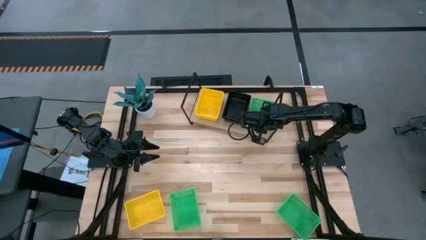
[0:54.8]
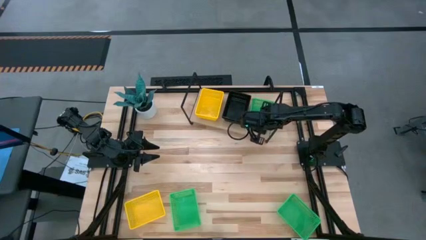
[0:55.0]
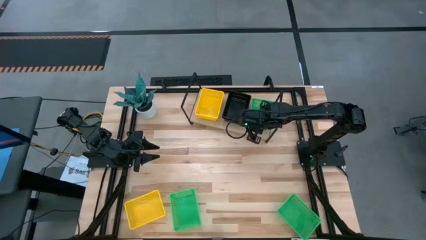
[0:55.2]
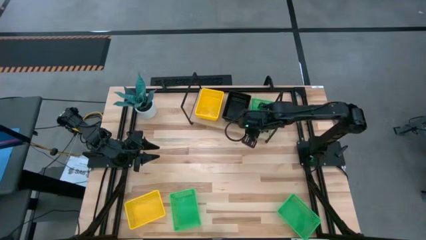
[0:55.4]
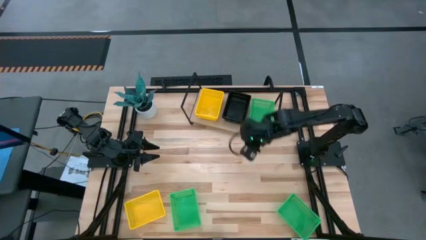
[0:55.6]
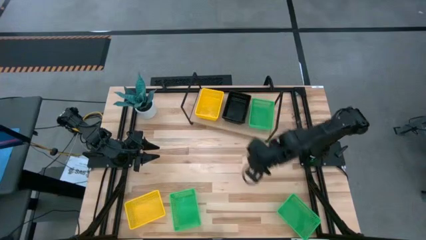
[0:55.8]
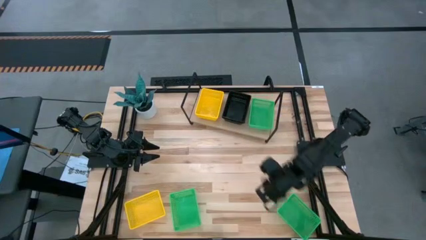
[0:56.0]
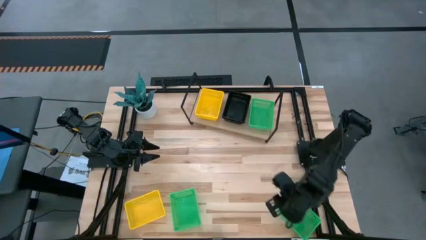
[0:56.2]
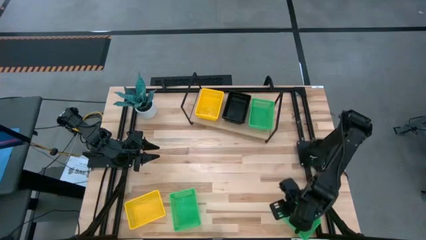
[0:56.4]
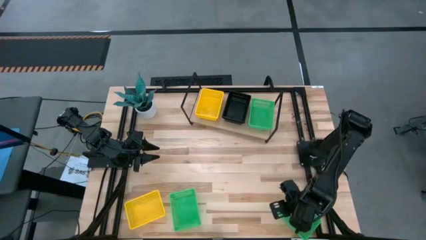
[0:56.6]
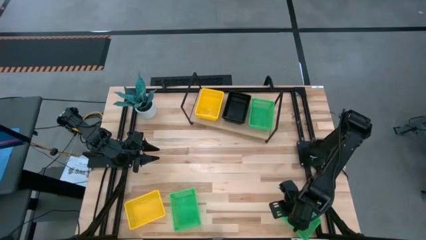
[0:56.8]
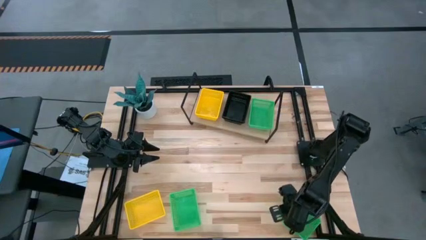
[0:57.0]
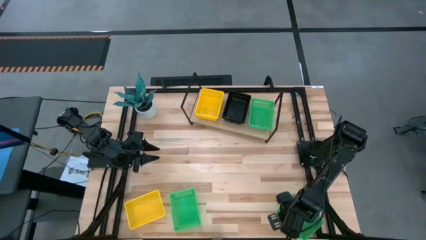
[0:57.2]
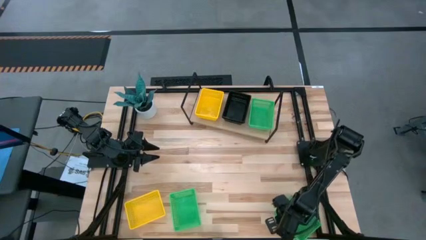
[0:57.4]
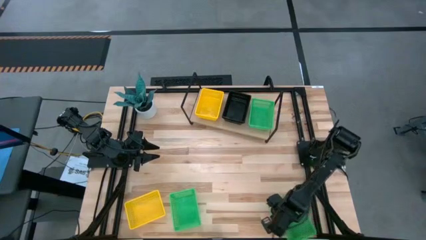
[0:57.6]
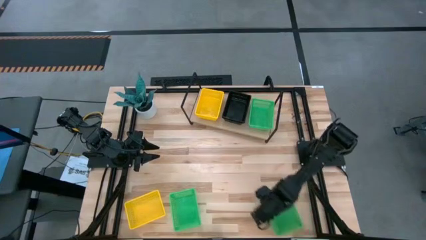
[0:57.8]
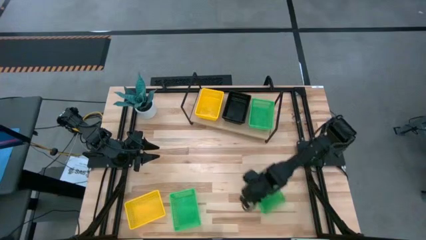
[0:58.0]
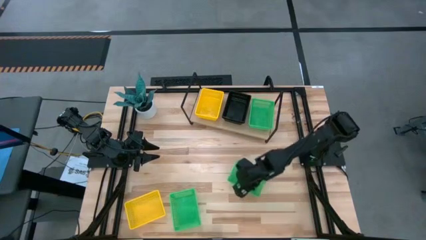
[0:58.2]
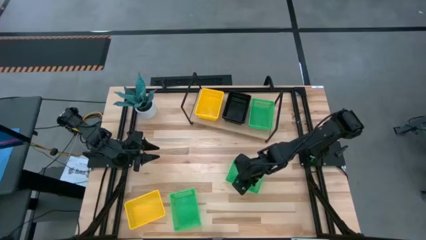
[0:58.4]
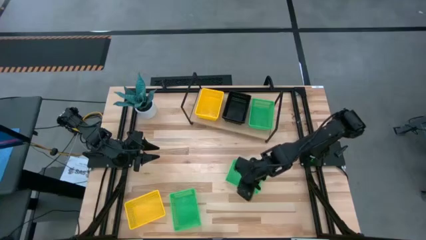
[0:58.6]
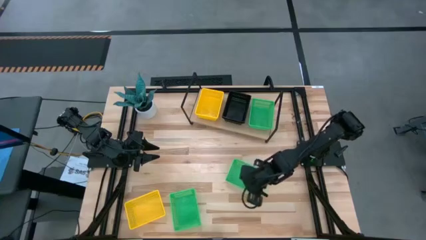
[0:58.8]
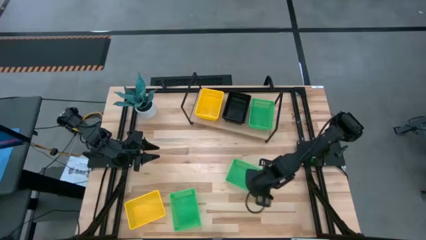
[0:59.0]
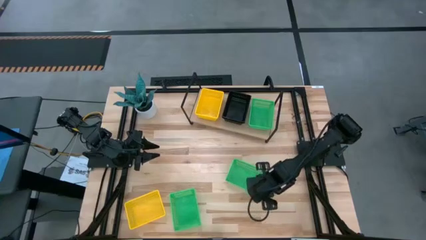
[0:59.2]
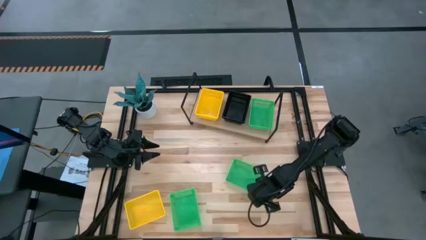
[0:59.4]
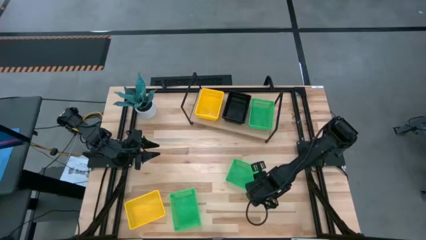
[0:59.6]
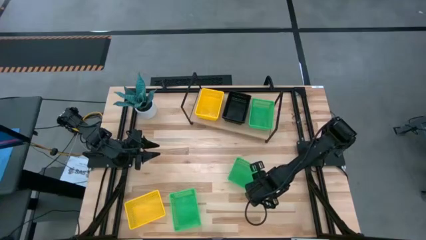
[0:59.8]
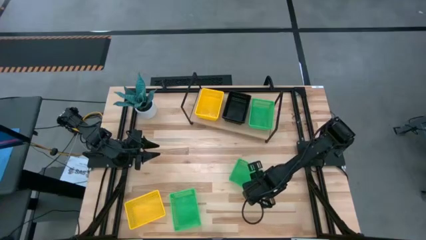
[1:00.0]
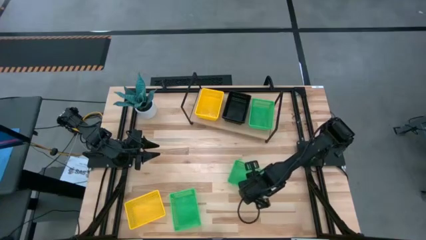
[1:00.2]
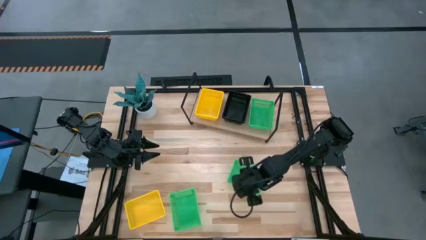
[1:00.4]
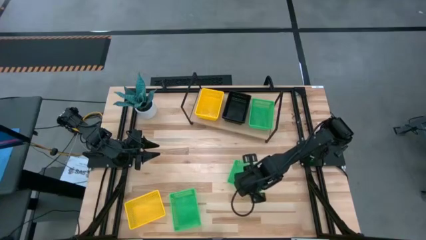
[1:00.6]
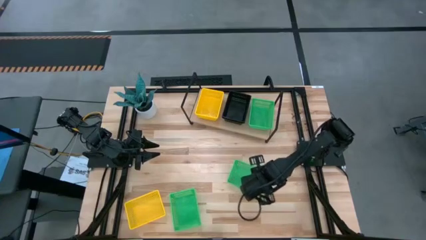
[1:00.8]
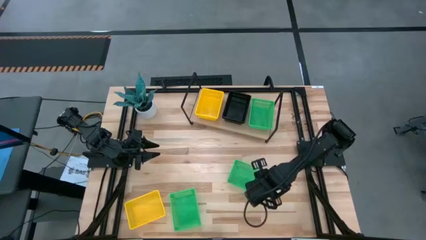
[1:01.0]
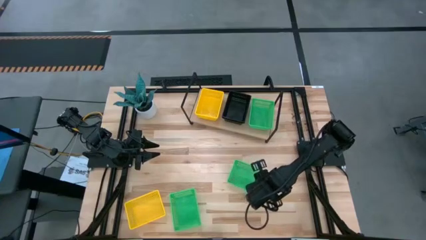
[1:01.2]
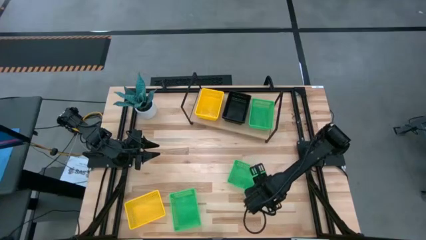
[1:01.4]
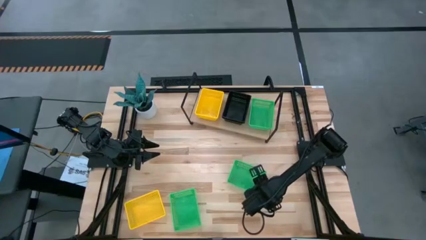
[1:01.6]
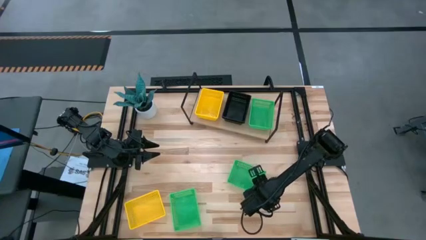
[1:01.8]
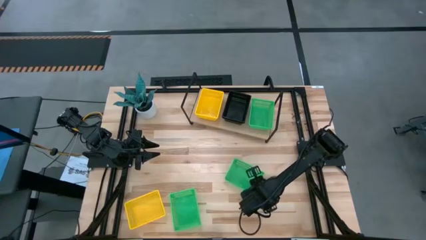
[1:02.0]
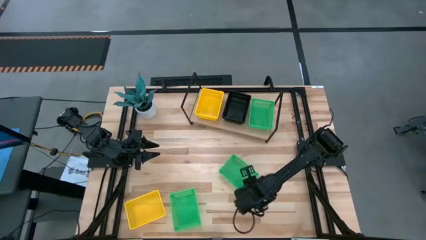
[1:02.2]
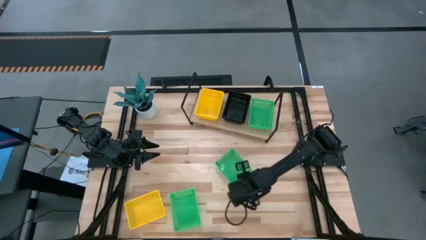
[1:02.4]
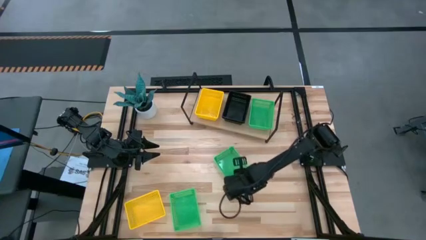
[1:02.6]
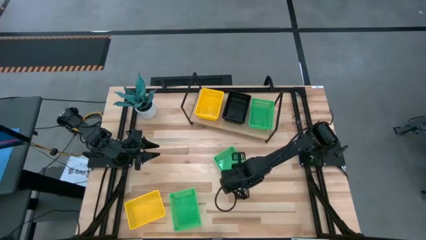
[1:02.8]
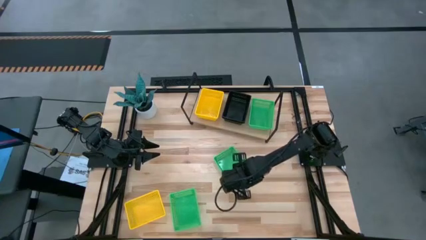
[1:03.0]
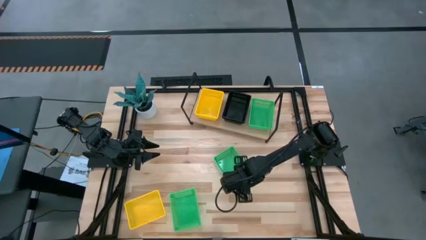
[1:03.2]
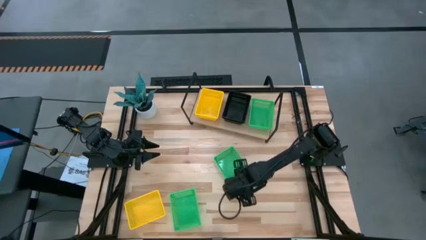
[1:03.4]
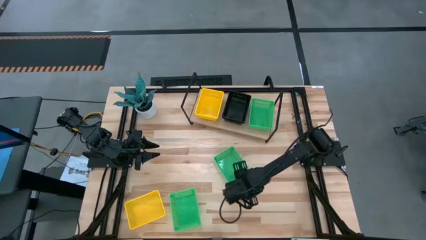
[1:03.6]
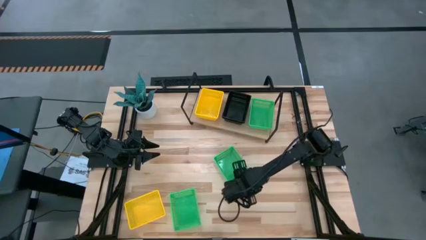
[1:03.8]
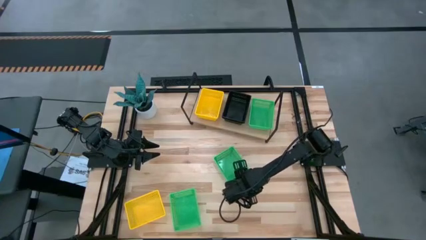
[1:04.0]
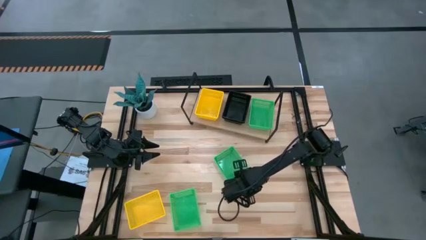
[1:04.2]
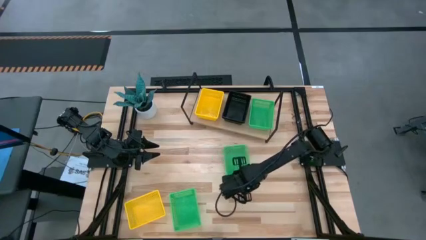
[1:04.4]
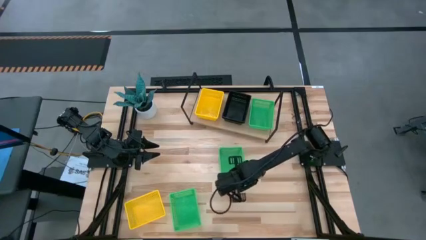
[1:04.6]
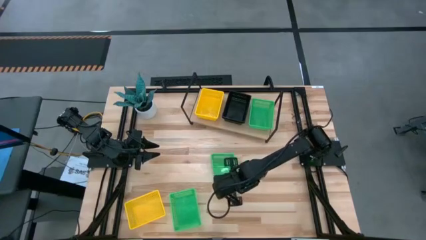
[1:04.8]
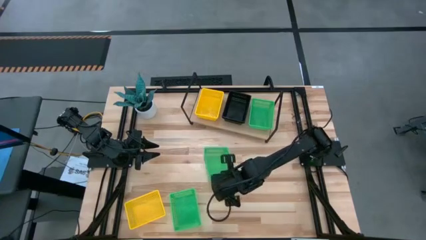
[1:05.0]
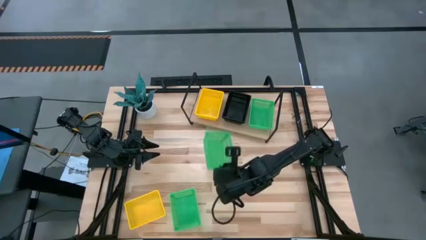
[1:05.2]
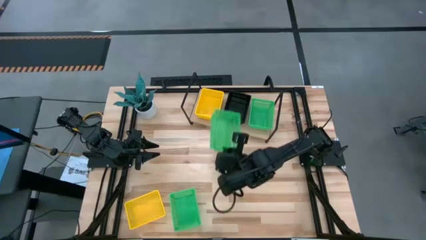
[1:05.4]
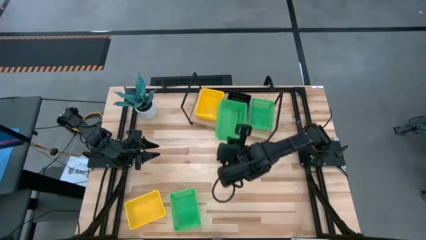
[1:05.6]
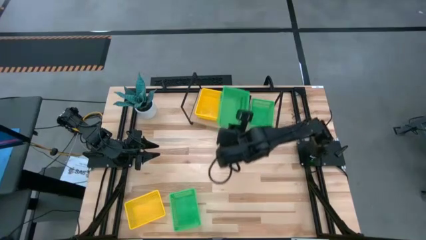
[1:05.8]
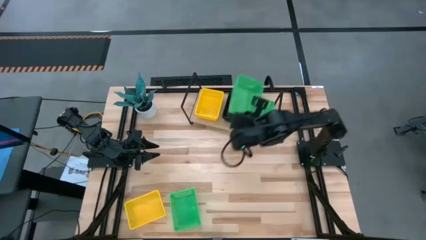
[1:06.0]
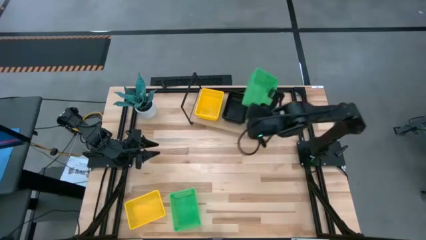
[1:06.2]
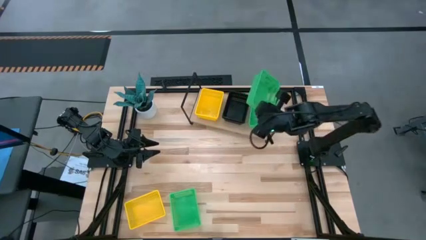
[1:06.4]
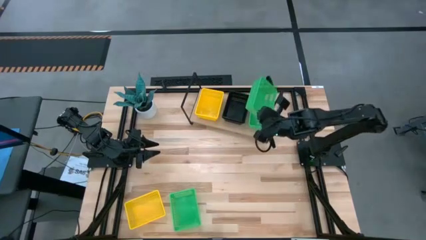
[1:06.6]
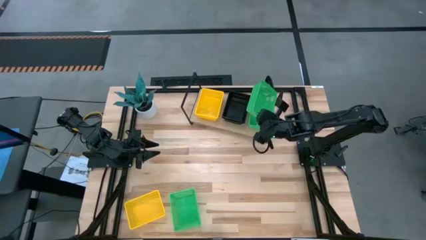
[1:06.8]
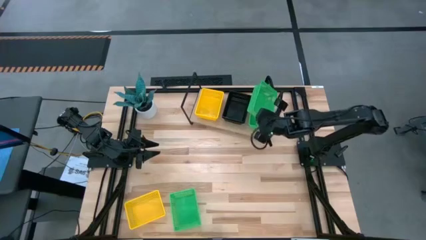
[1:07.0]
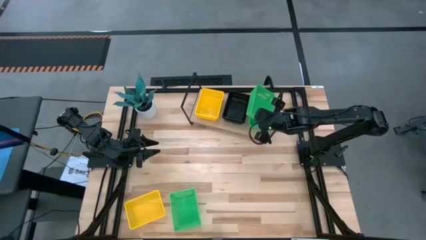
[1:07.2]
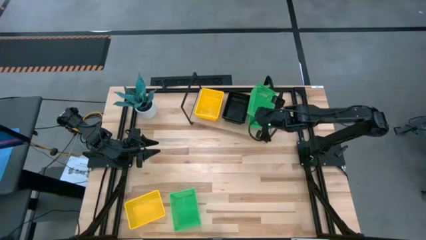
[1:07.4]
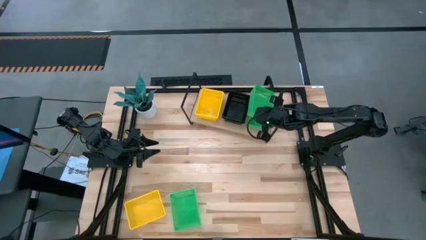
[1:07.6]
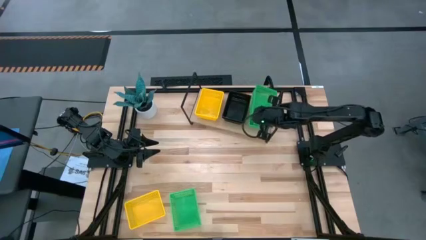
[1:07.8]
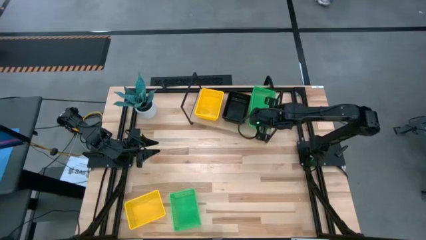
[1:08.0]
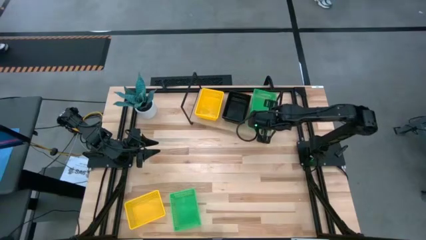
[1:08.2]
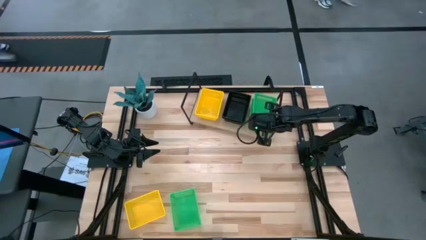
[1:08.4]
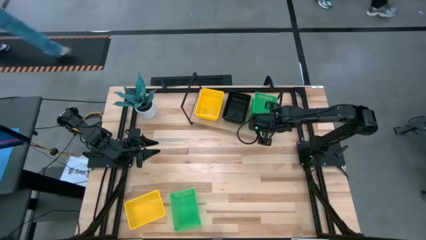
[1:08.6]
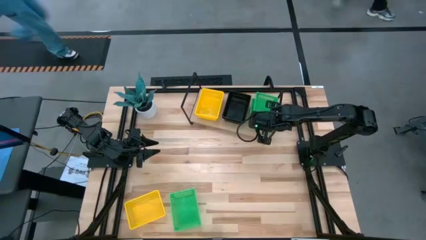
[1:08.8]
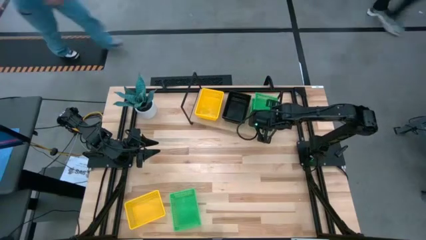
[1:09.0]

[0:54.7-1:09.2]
Task: Stack baskets on shelf by color
Stack the green bin on top of the green bin on the shelf

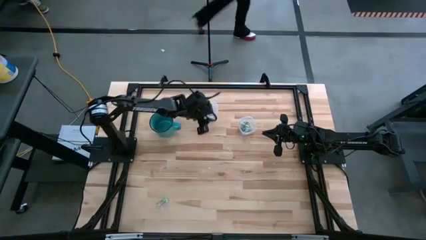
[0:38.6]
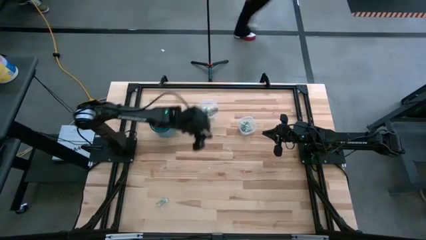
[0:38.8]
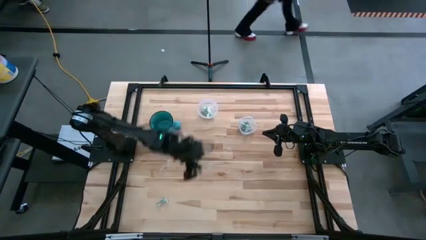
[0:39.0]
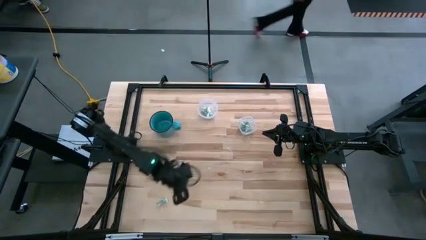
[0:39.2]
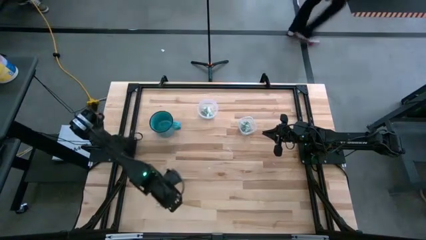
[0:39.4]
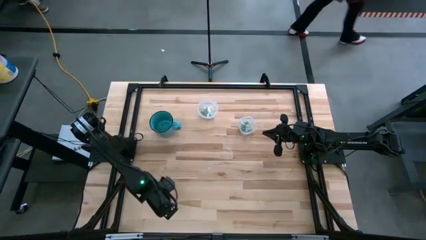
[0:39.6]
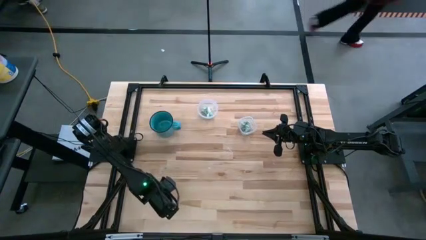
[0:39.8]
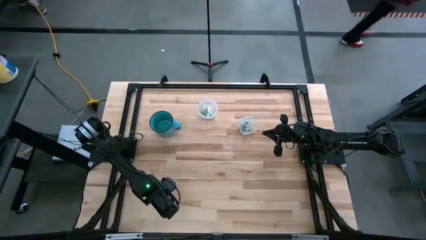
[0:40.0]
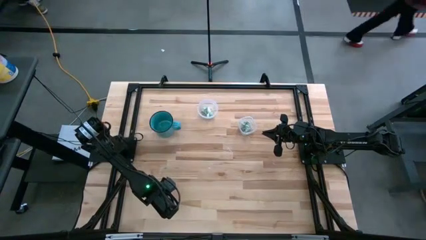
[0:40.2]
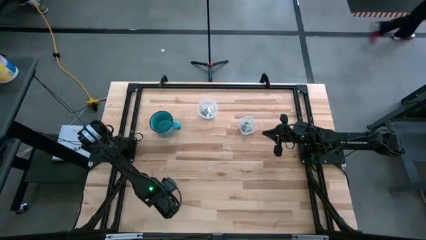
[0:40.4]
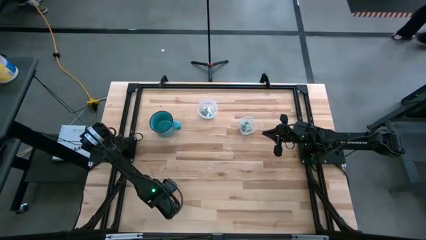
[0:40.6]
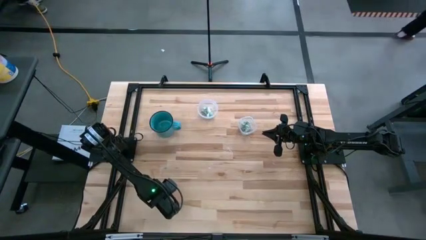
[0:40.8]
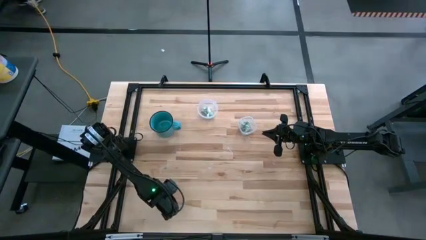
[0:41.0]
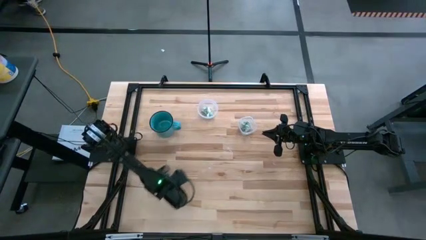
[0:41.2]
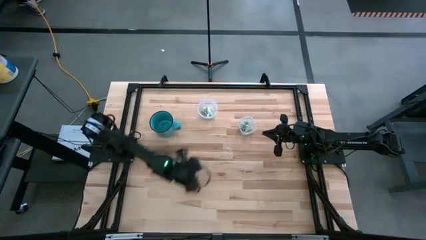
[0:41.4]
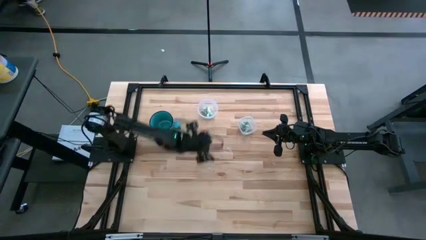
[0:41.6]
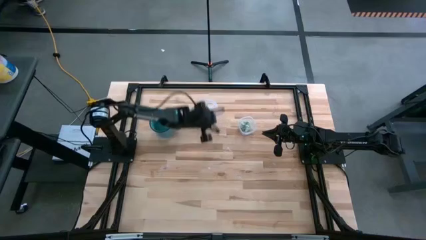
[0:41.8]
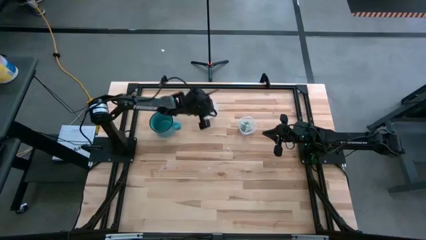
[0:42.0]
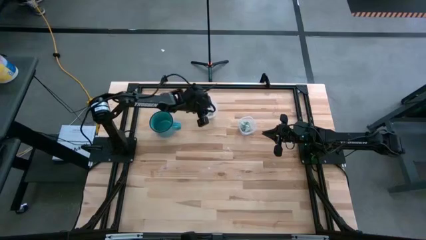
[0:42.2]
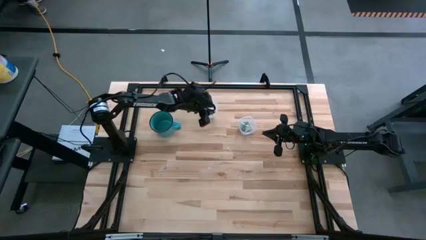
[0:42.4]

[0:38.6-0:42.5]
Task: Pick and place items into bin
Put the stevia packet into the large transparent bin
